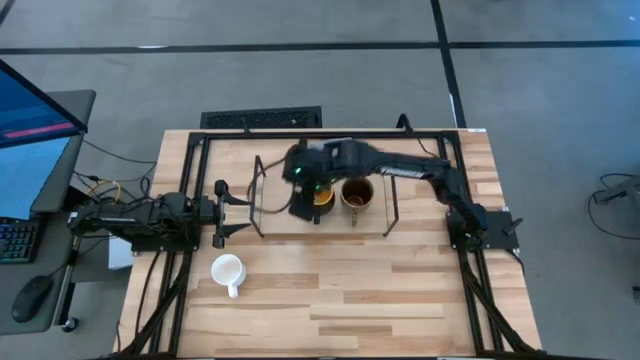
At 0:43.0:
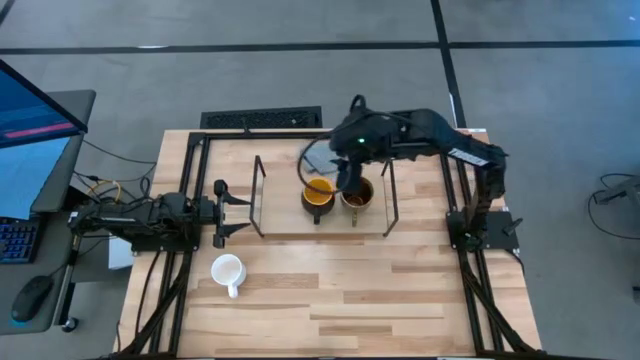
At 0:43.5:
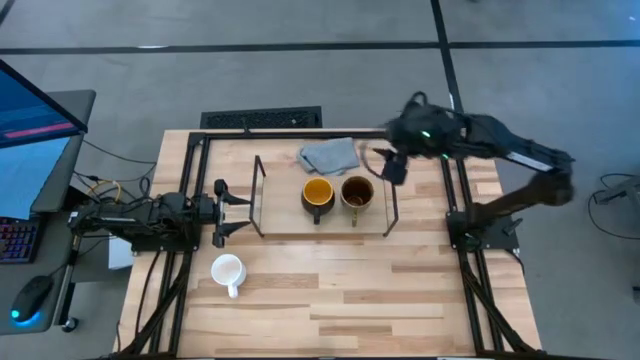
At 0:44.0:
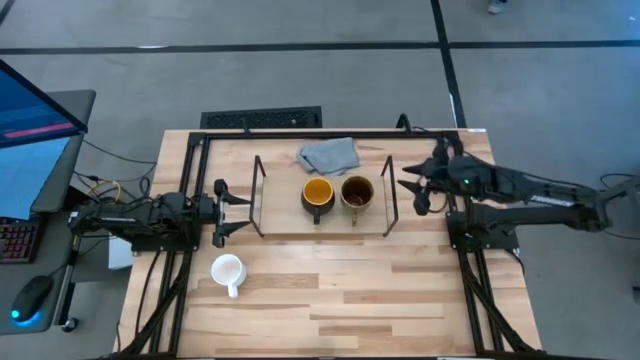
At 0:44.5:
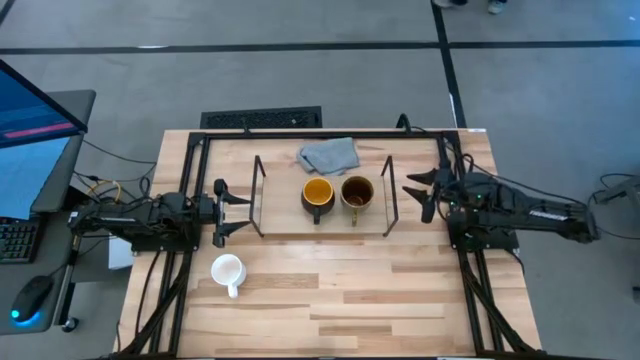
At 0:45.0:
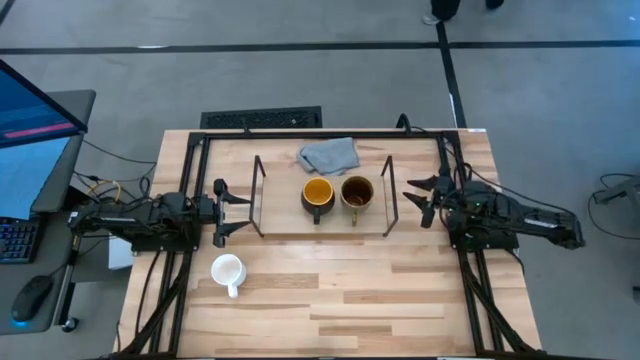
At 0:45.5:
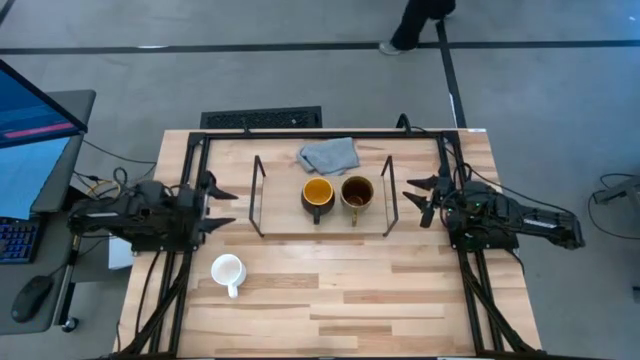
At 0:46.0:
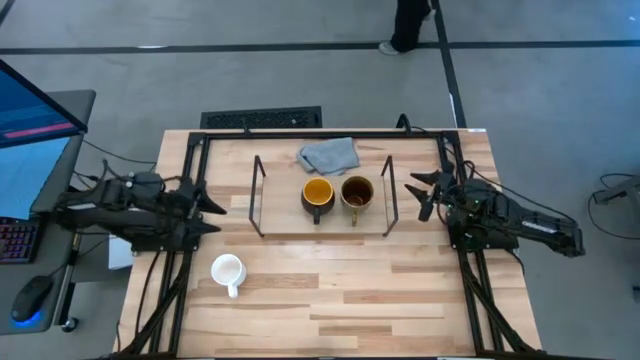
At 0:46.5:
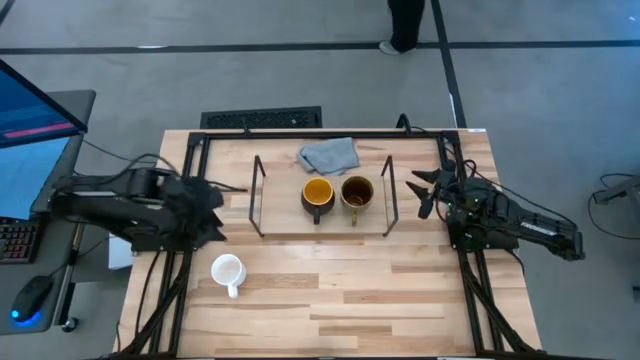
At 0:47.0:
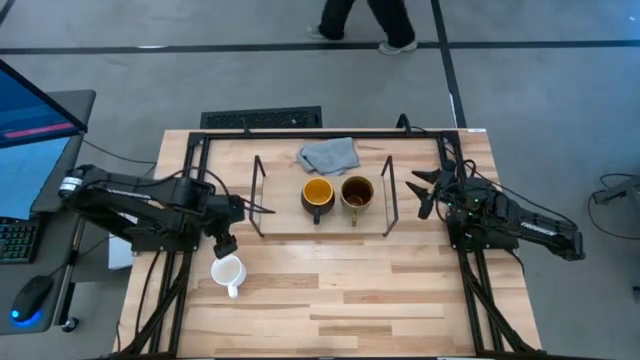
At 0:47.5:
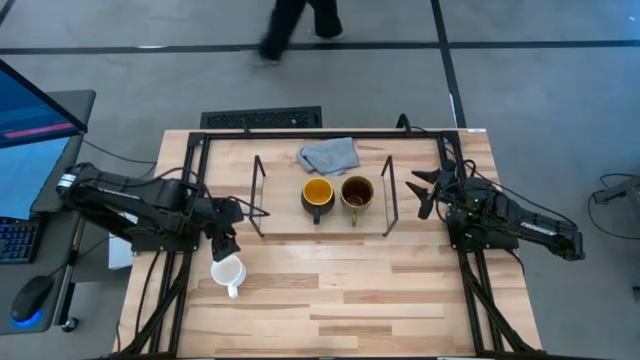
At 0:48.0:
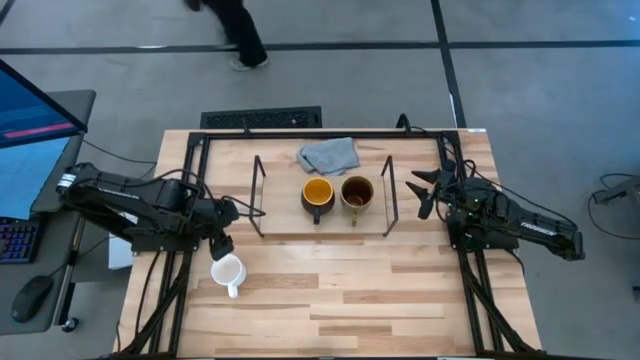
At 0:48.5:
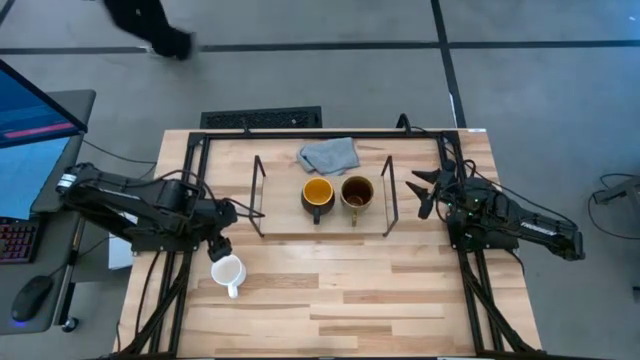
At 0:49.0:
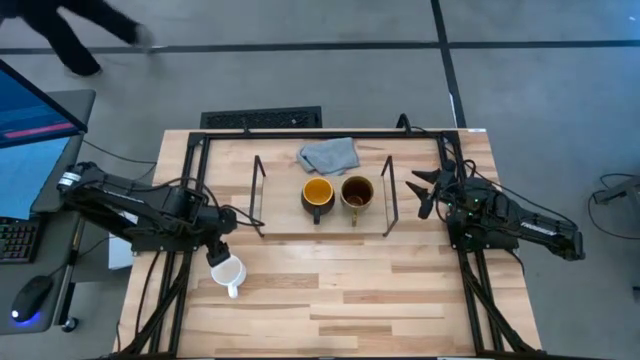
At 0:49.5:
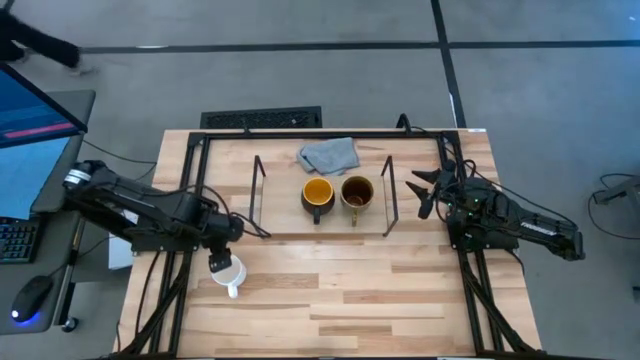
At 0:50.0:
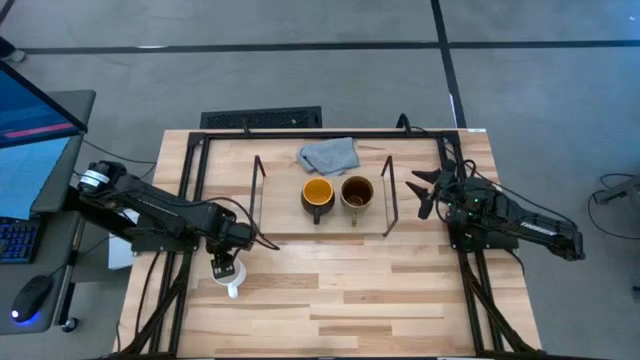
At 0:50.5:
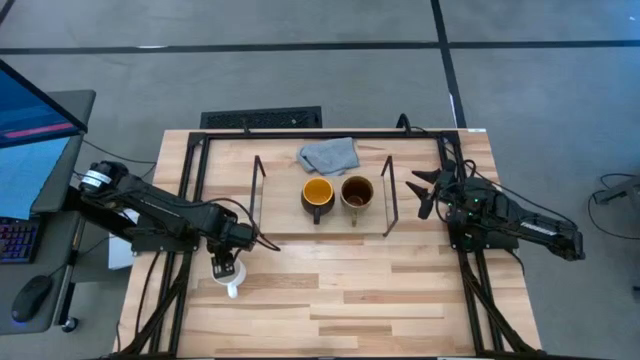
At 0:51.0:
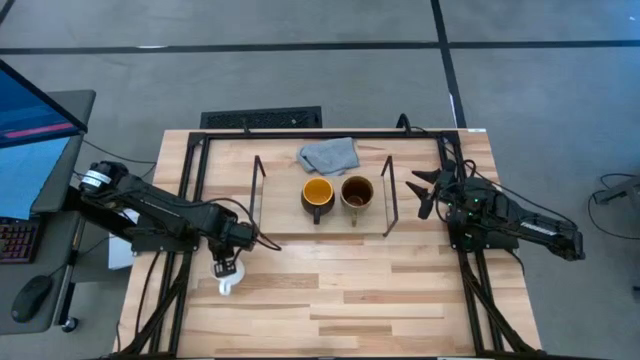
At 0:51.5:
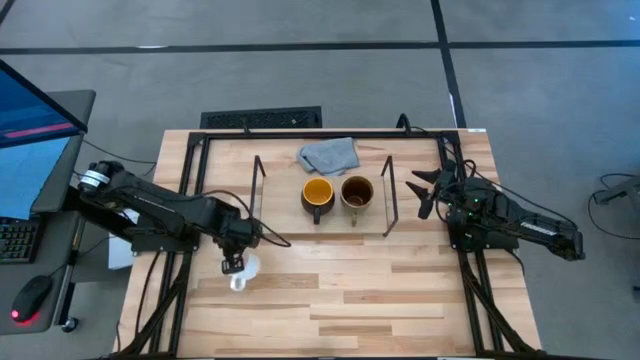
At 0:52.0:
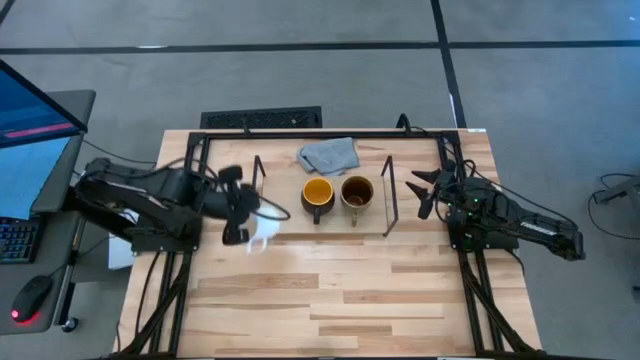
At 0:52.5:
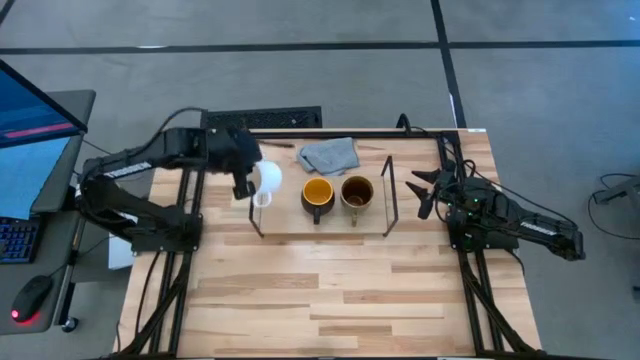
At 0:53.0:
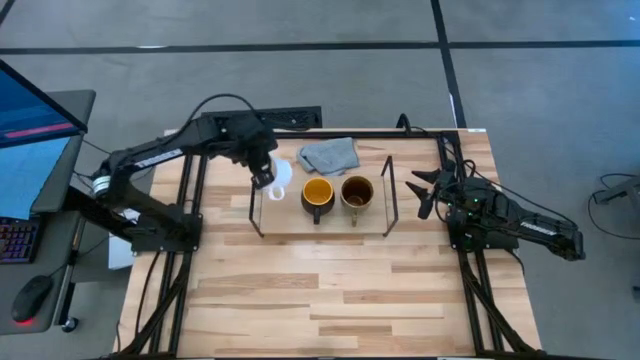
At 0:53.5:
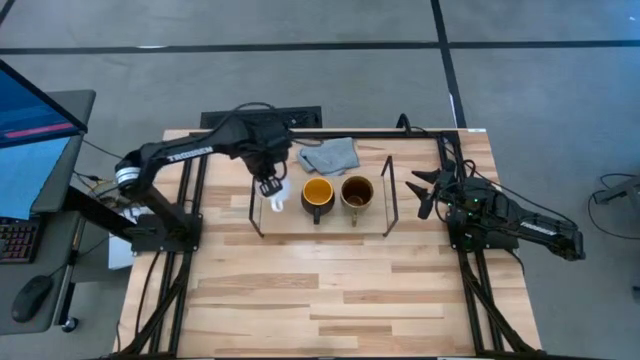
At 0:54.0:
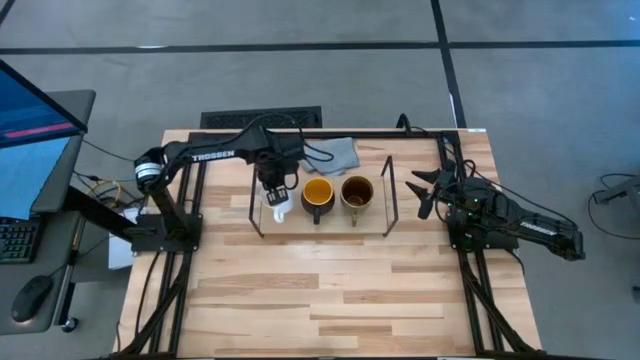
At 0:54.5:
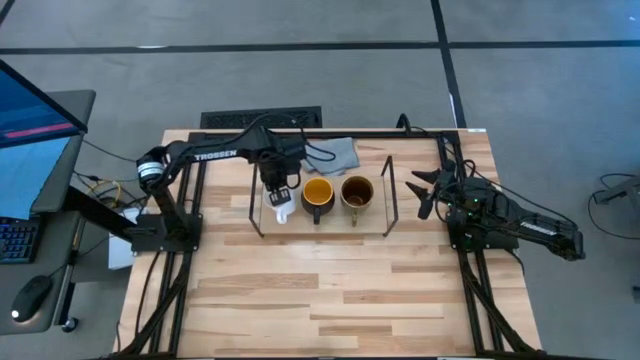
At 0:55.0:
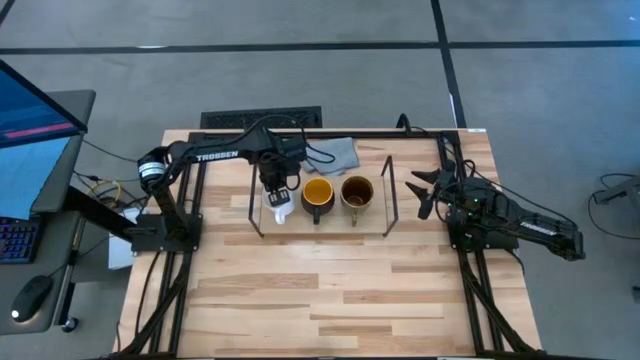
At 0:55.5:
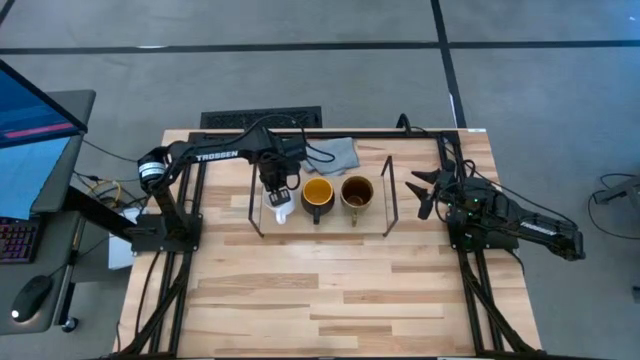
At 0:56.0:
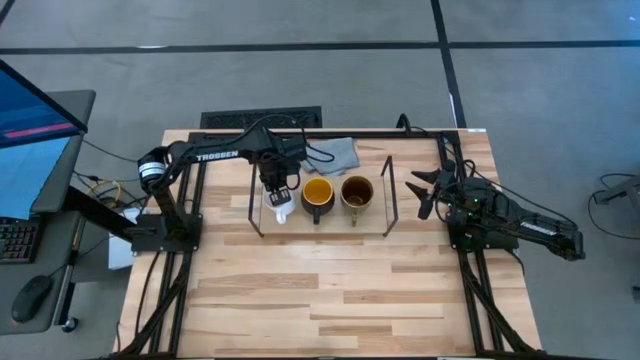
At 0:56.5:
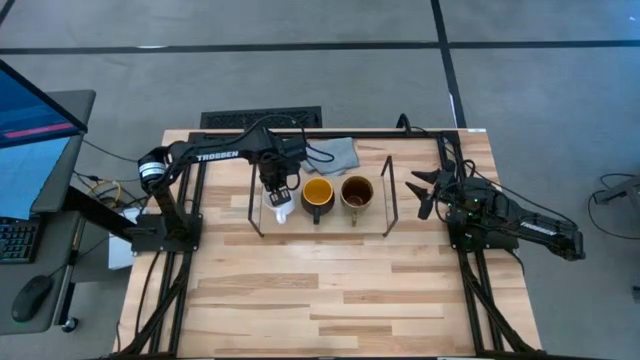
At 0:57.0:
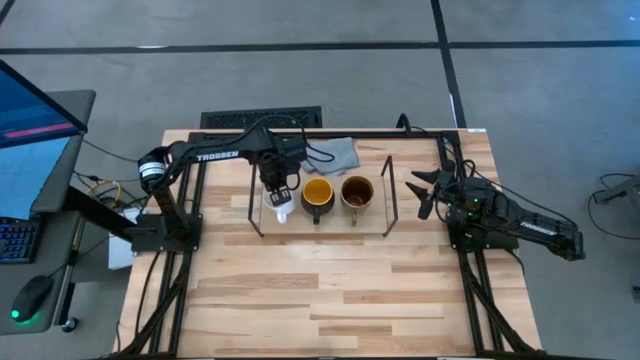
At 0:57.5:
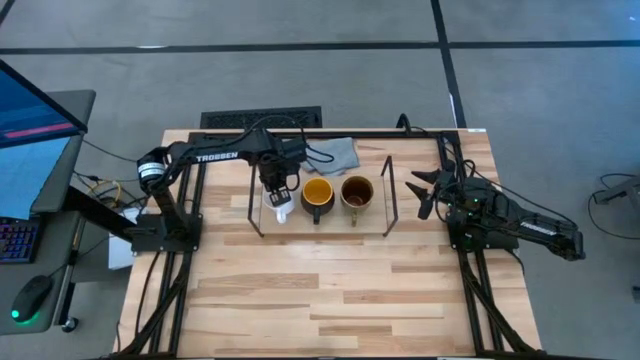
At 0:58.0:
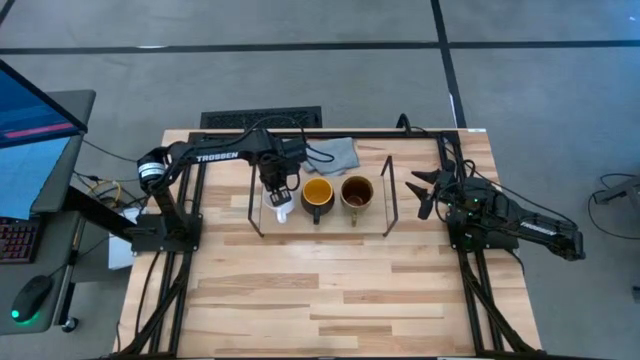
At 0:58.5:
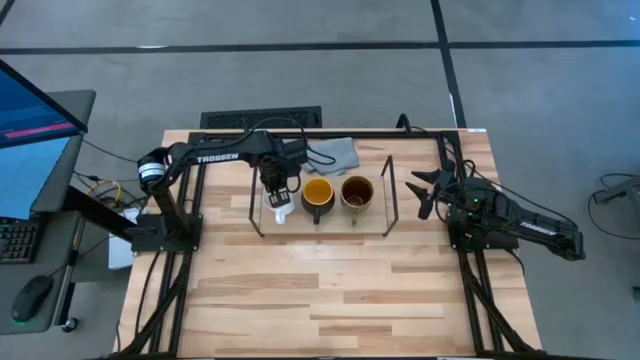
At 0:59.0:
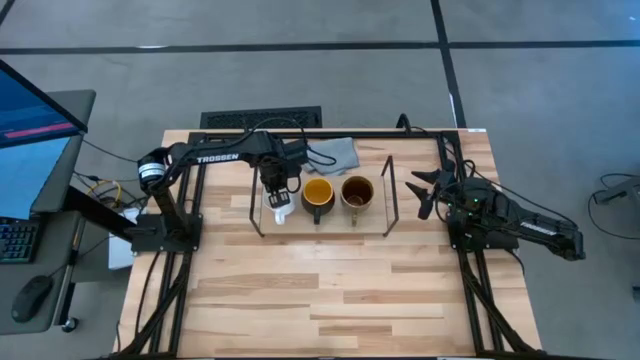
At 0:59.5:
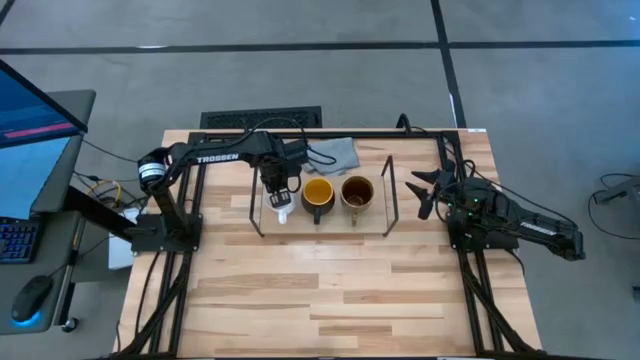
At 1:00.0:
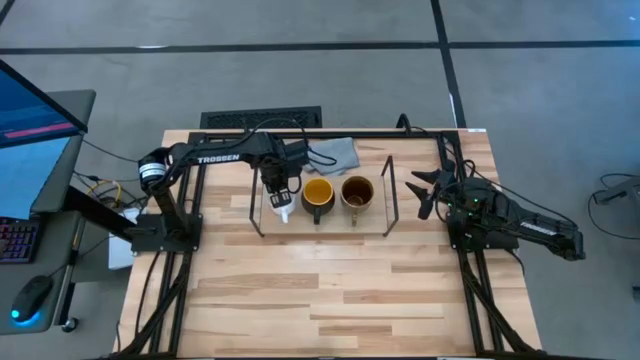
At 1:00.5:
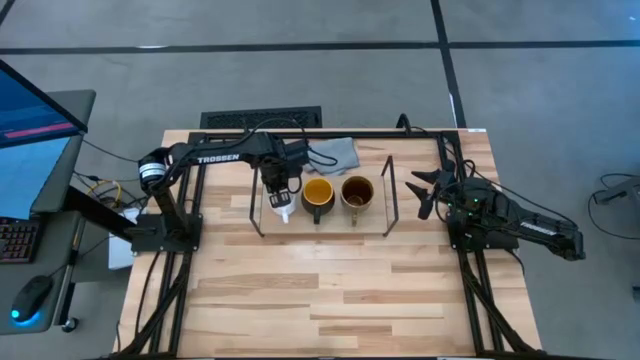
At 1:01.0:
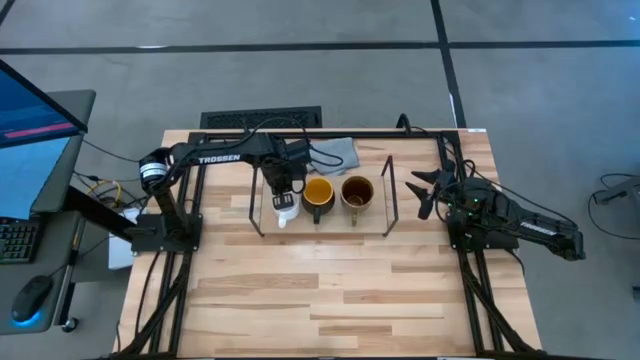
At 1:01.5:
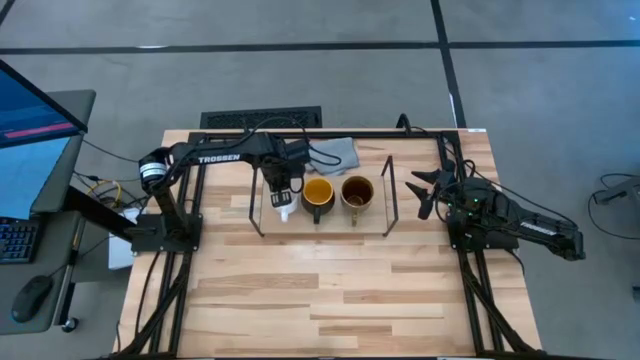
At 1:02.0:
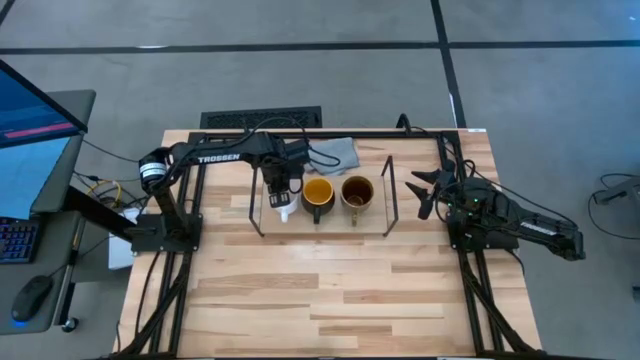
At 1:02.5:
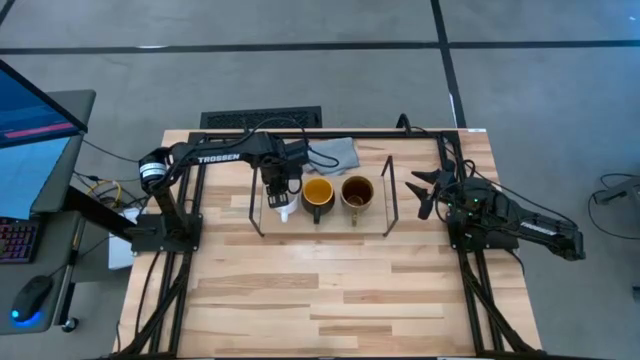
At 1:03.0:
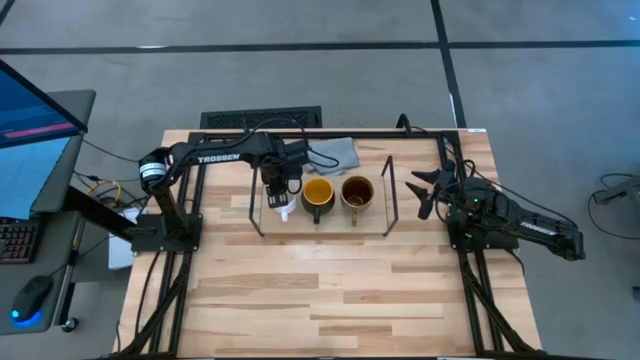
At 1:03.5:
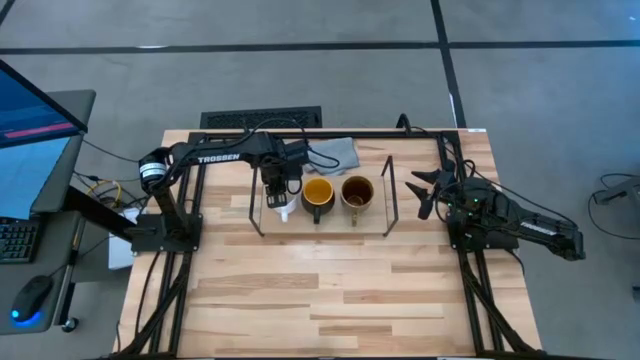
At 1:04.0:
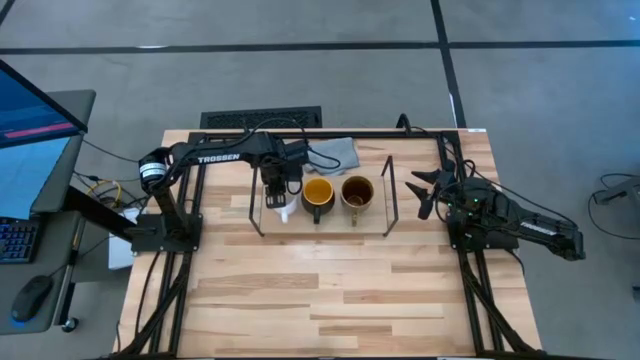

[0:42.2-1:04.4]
Task: Stack small to large cups/mugs on shelf
Put the white mug on the shelf
